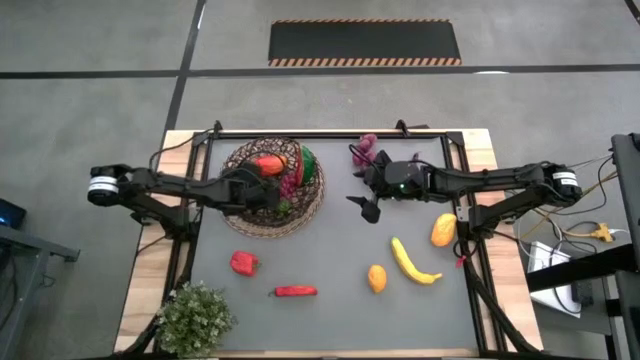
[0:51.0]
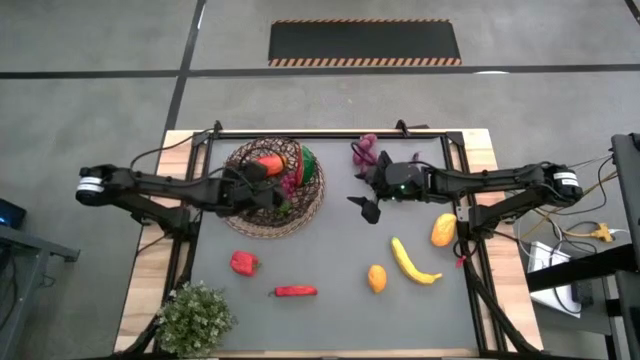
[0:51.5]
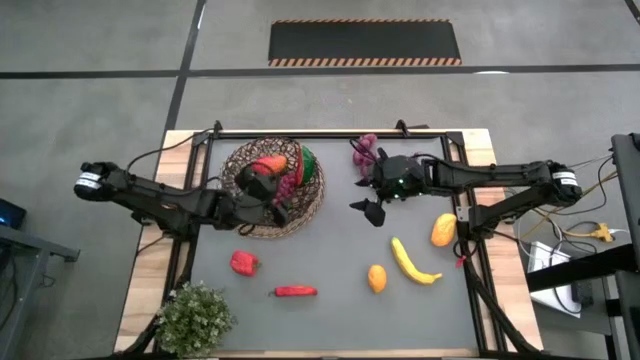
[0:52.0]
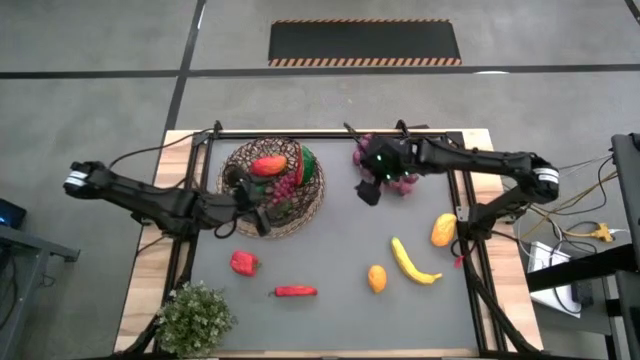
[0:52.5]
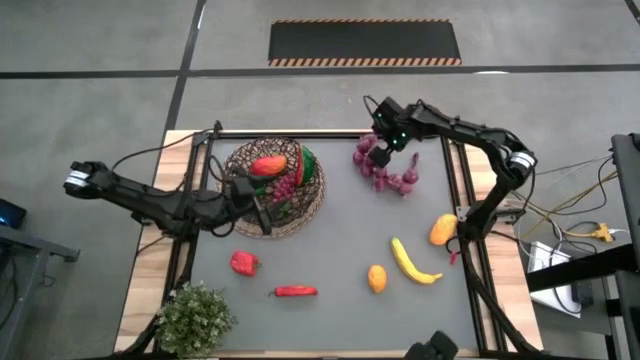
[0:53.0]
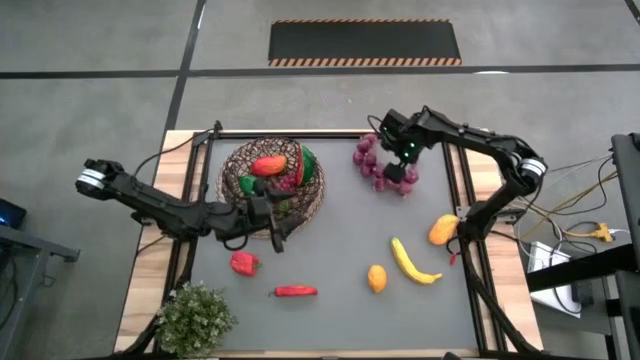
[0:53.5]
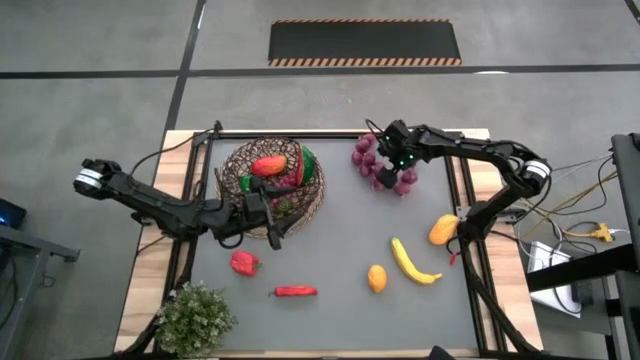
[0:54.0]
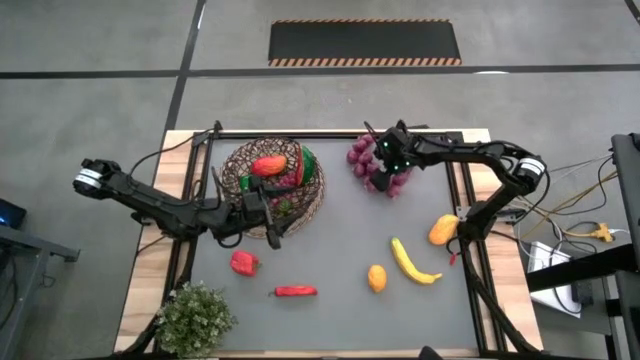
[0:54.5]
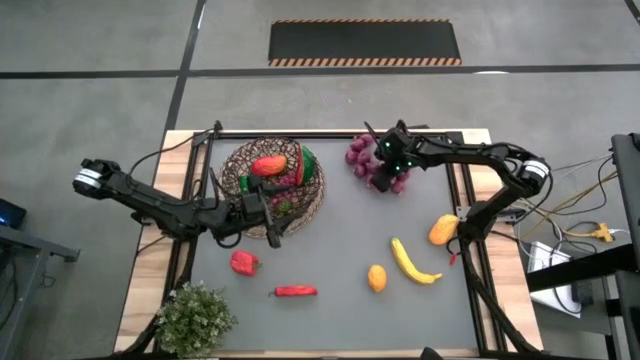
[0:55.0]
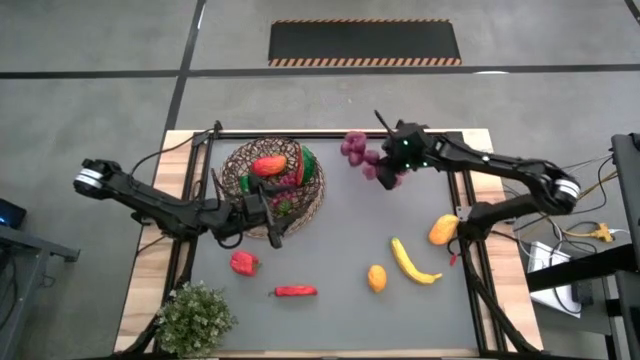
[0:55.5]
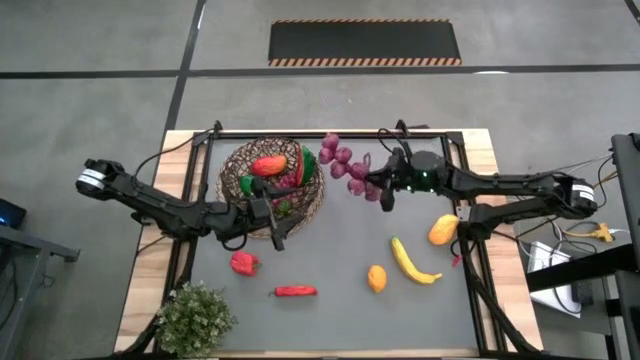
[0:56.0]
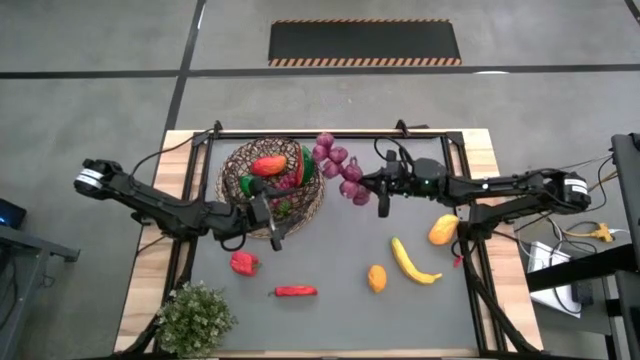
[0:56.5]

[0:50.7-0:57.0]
Task: Build produce basket
Put the purple garlic into the wire basket

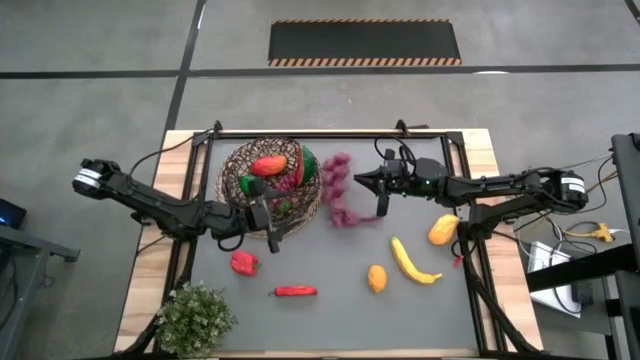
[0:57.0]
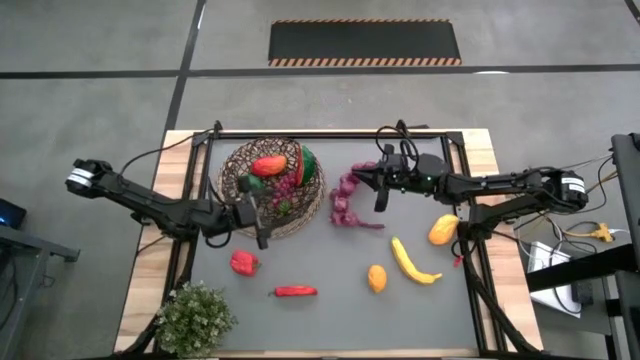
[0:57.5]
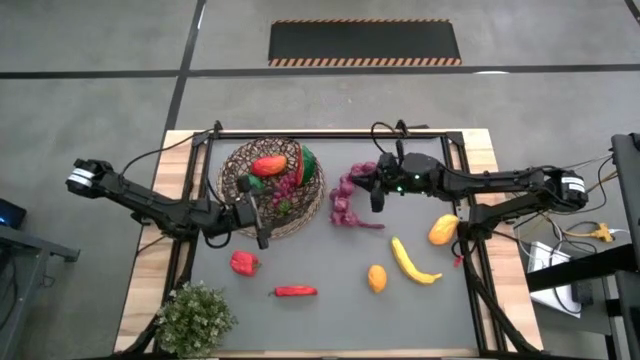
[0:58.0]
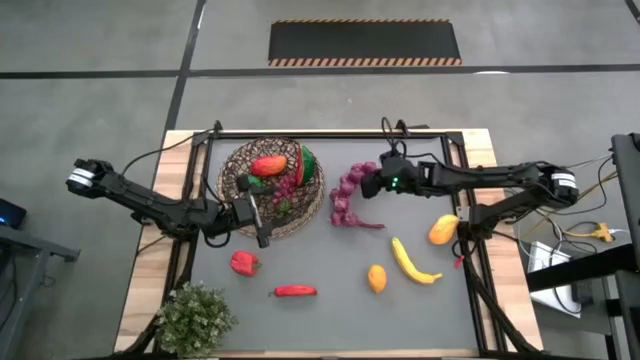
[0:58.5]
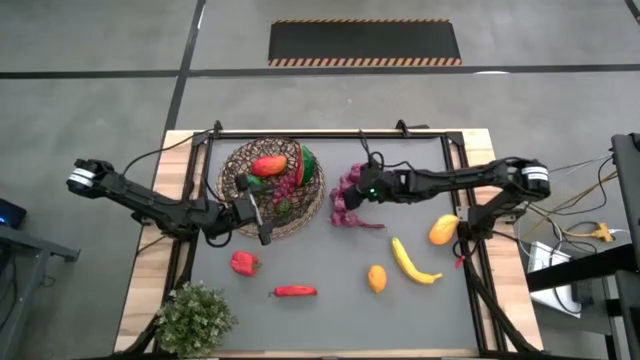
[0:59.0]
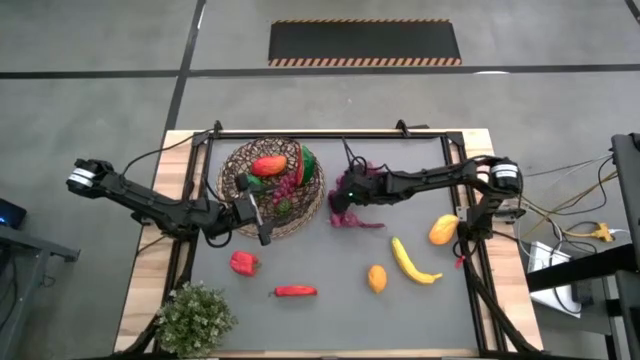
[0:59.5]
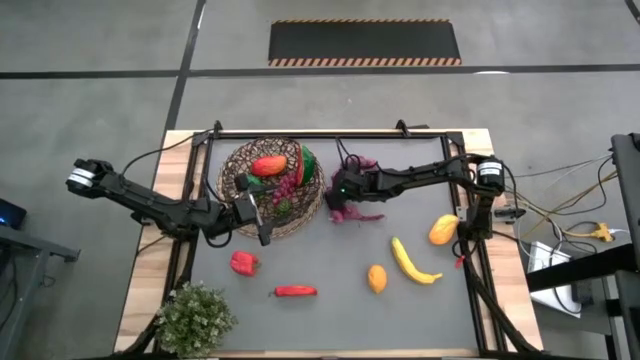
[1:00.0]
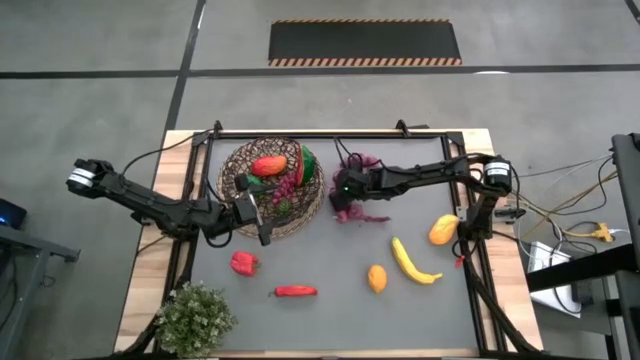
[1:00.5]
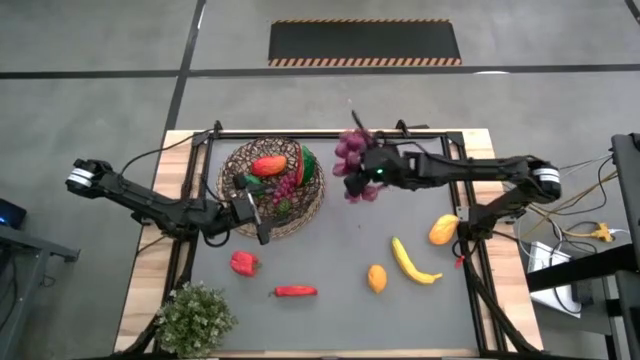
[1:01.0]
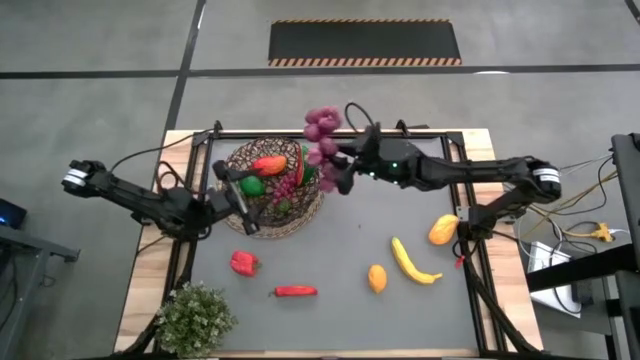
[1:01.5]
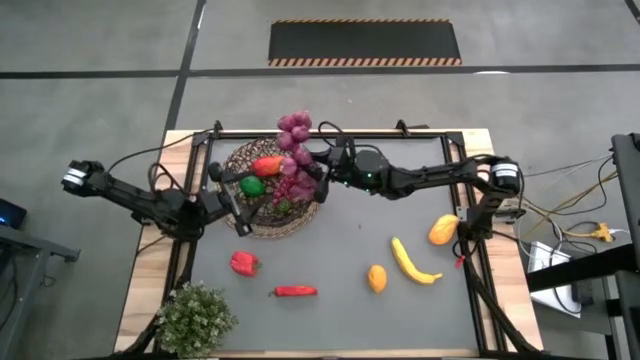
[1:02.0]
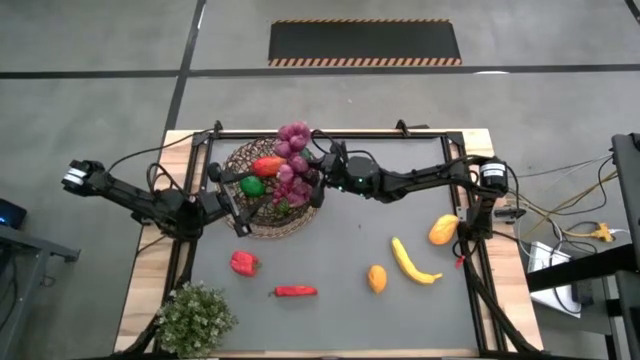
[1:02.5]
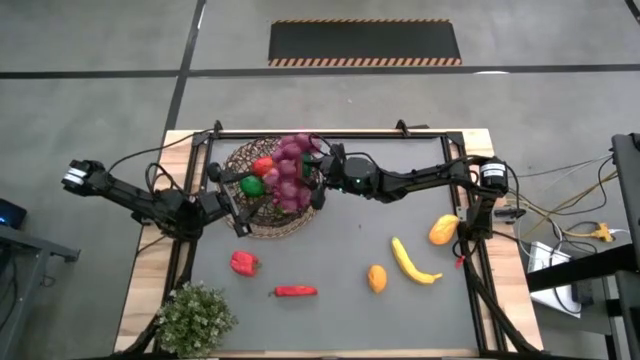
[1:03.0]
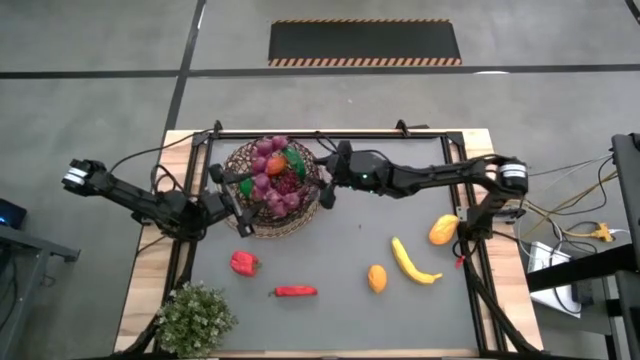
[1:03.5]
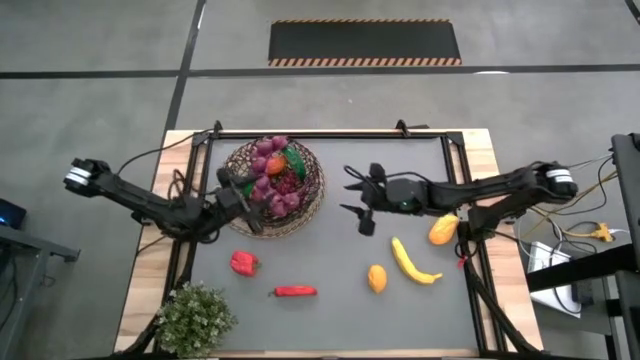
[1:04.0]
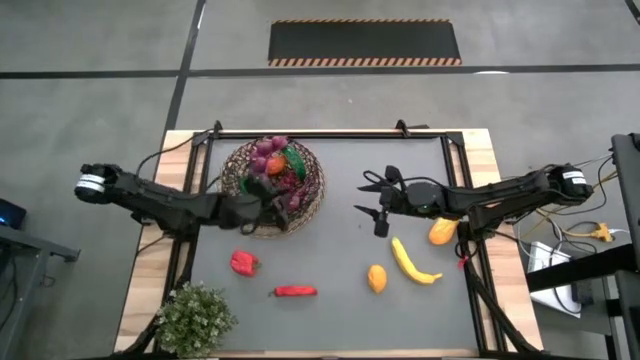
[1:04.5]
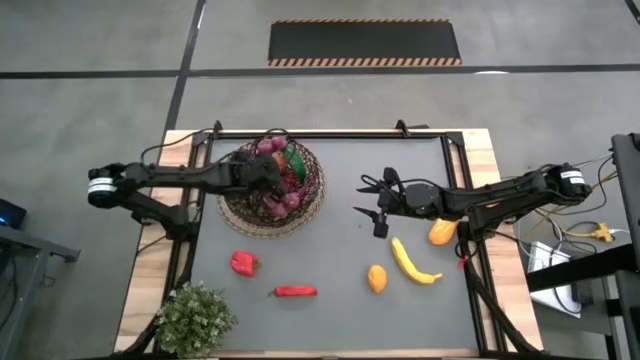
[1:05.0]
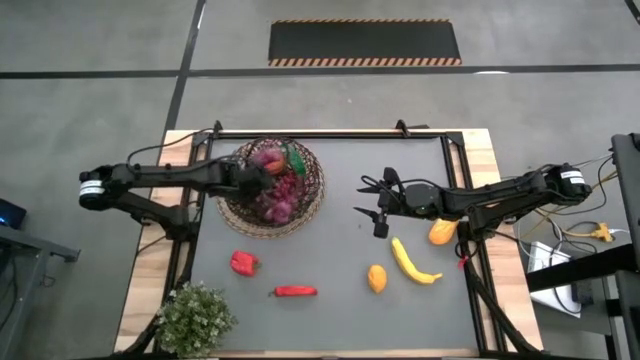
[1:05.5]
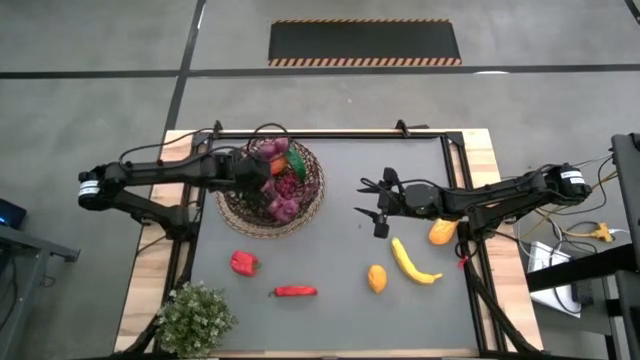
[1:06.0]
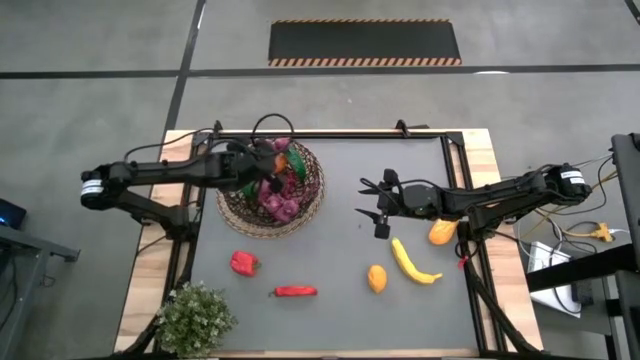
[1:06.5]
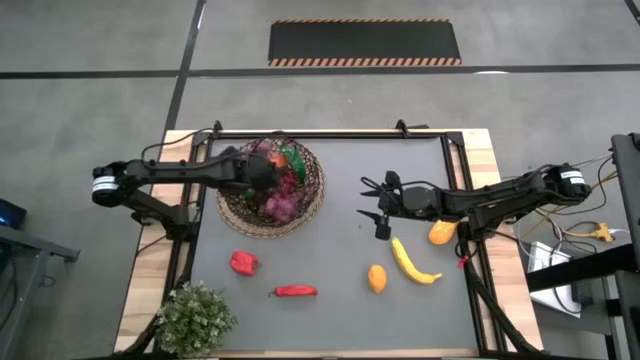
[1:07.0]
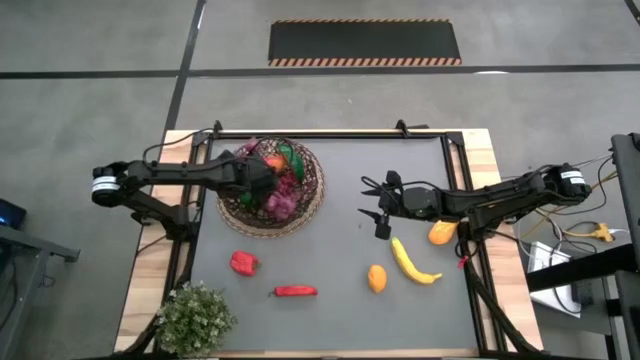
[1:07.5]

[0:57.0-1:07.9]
Put the purple garlic into the wire basket

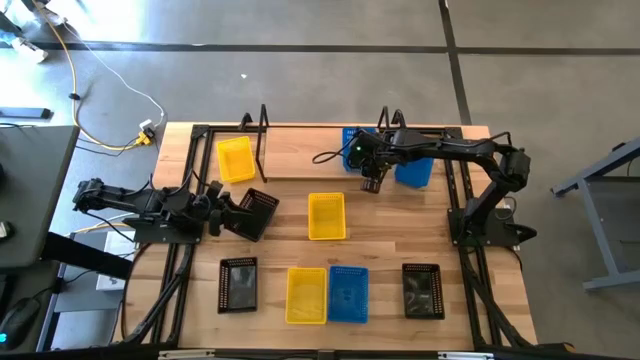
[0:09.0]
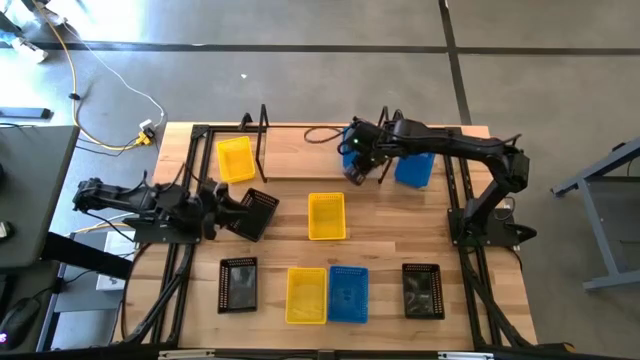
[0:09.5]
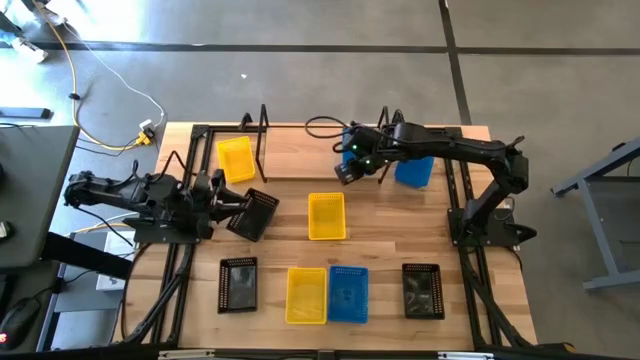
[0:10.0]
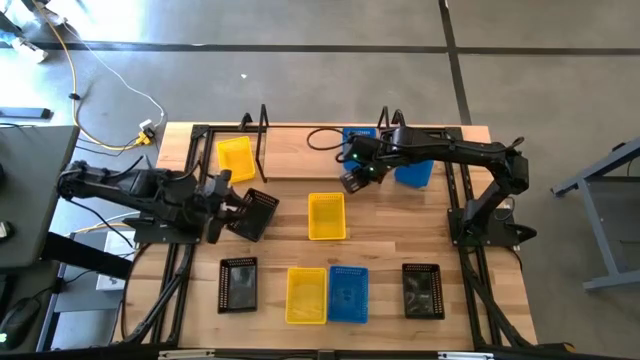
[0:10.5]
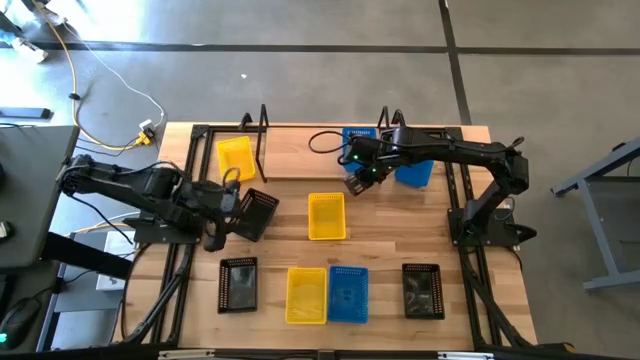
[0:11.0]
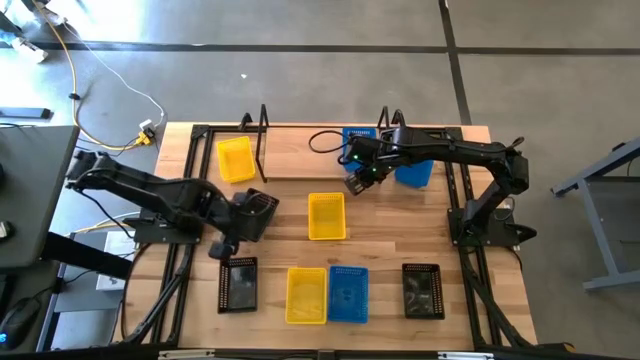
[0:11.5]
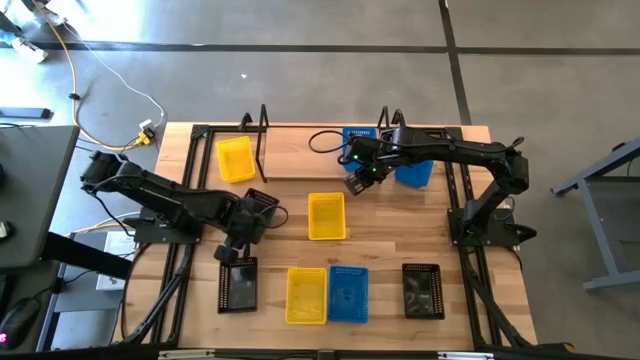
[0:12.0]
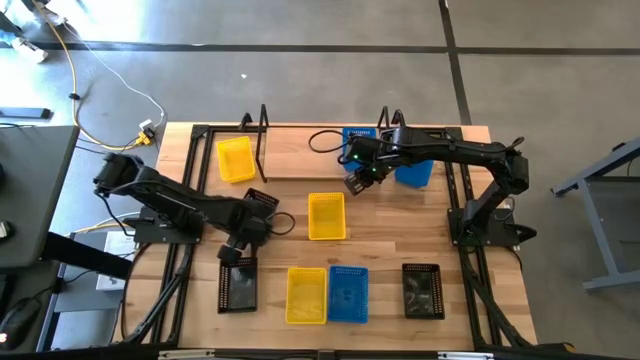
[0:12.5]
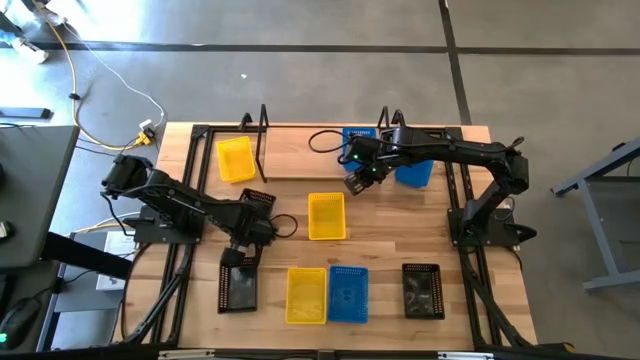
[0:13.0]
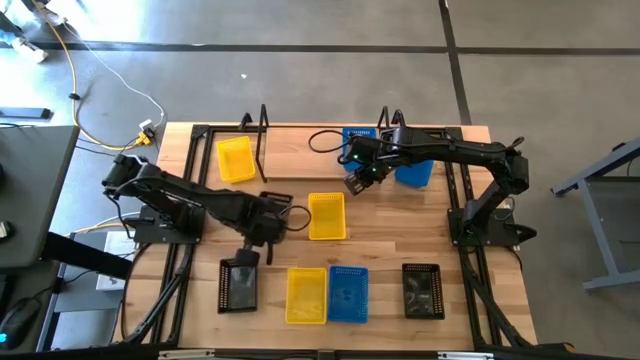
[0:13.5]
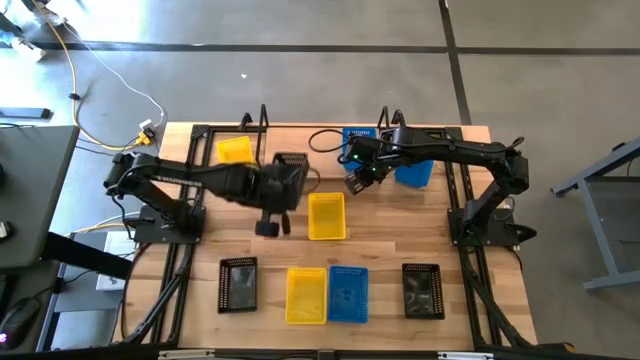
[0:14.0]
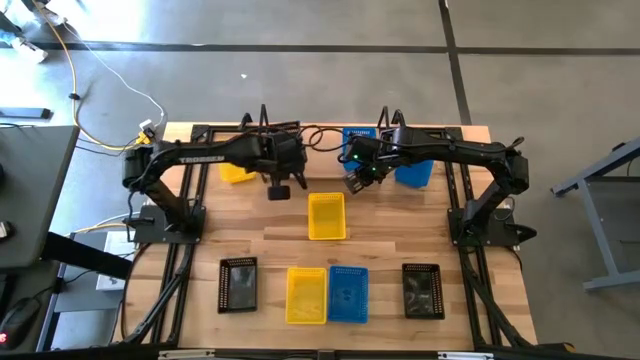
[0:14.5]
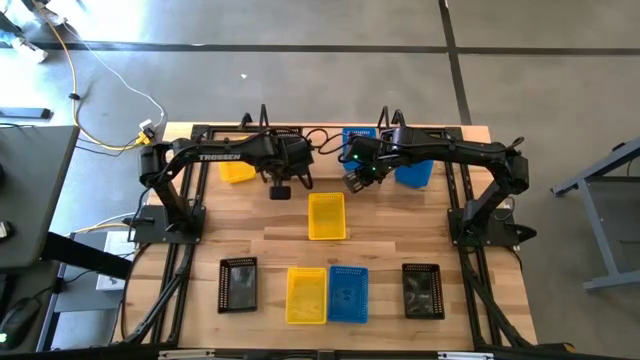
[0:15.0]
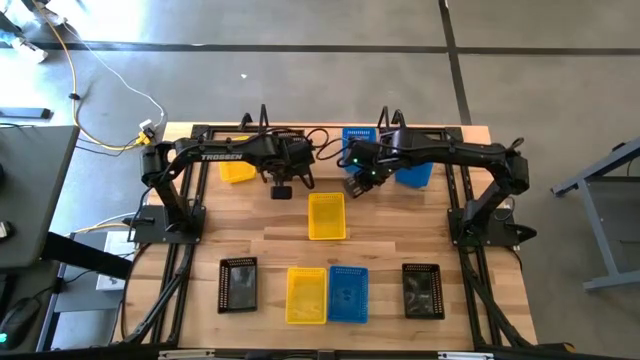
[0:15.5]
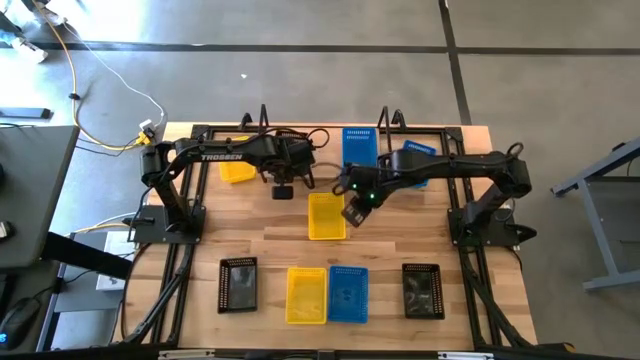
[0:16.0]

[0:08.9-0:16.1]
Task: Stack baskets on shelf by color
Put the top left black bin on the shelf
